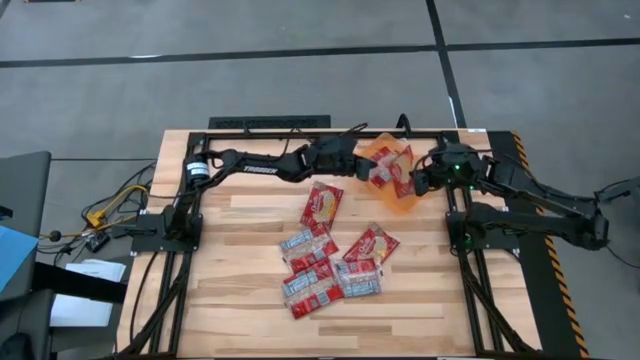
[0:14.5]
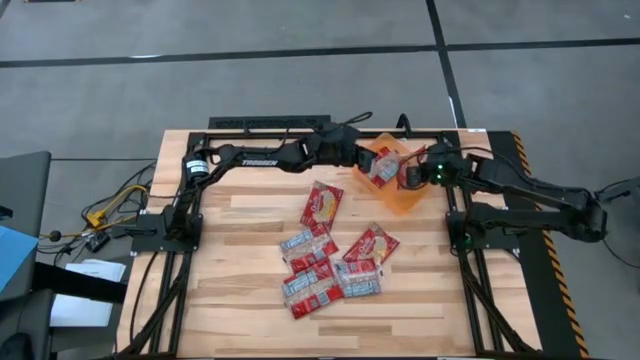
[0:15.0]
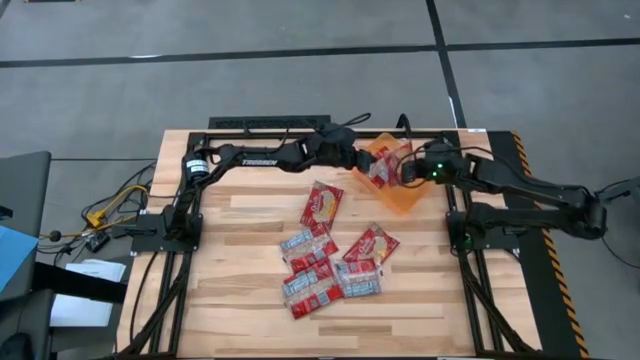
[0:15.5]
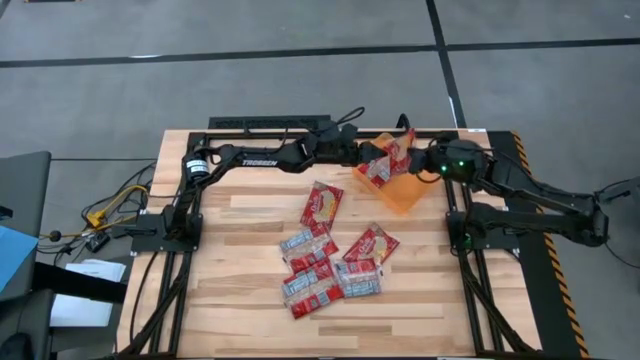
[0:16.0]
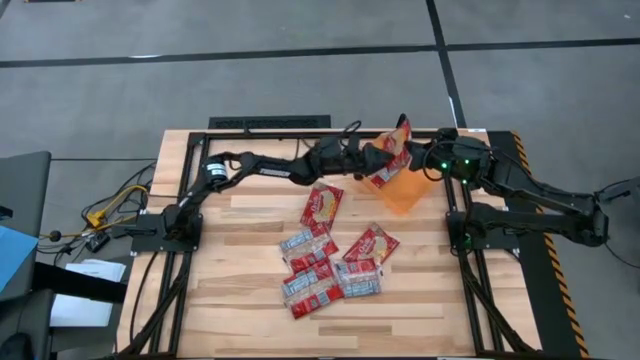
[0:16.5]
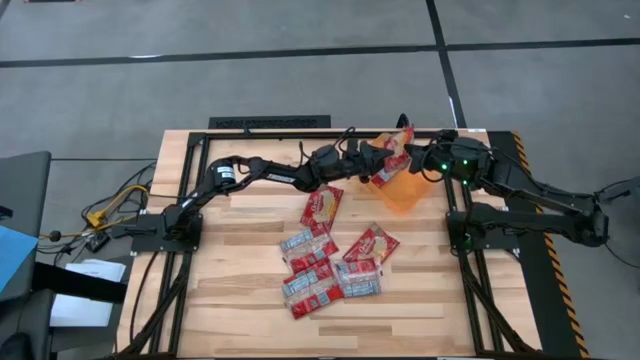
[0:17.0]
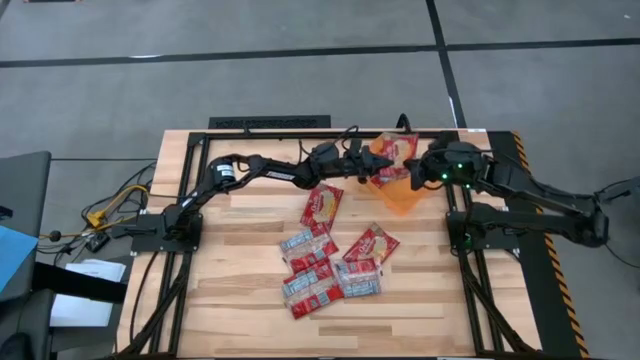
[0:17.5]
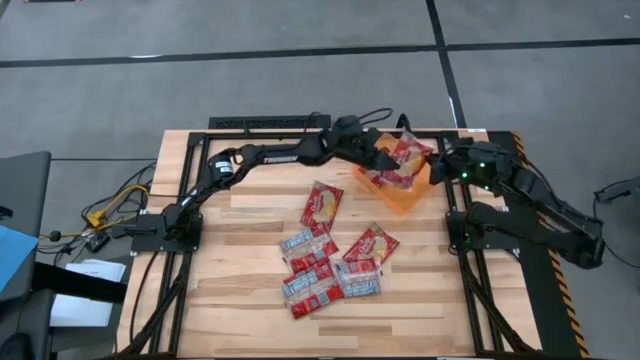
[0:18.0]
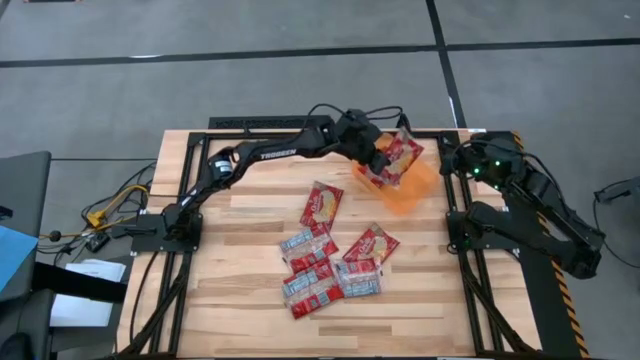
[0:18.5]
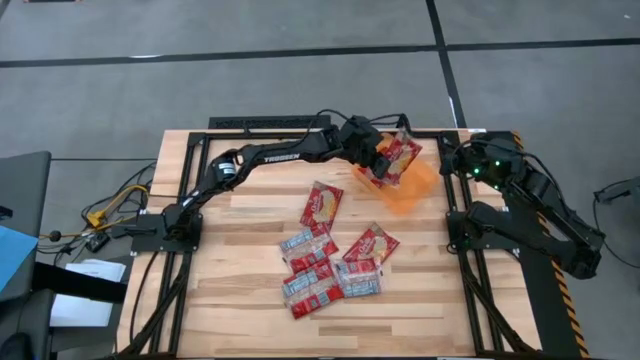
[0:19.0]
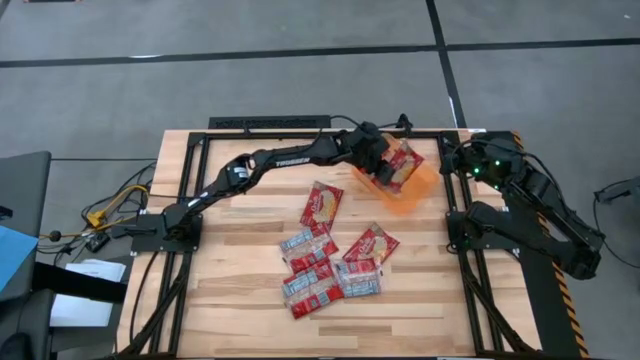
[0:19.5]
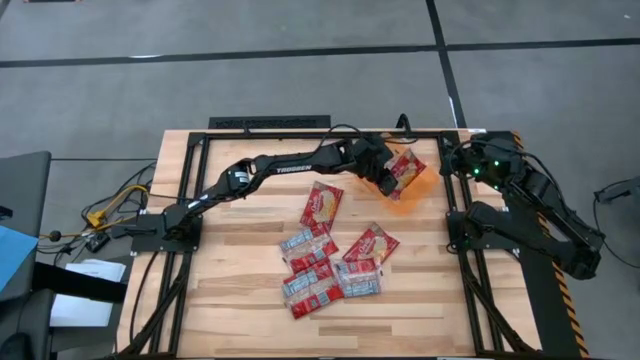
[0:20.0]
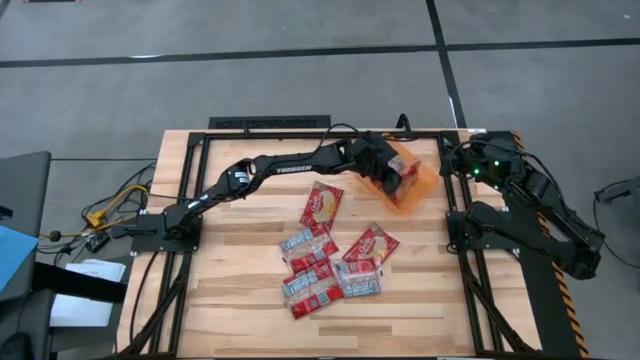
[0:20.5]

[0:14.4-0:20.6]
Task: Sort popcorn bags into baskets
Put the popcorn bag into the orange transparent bin

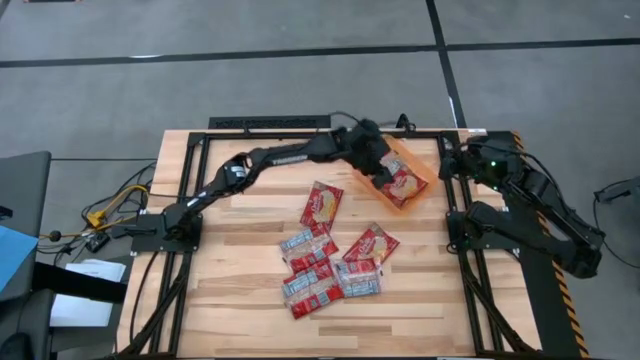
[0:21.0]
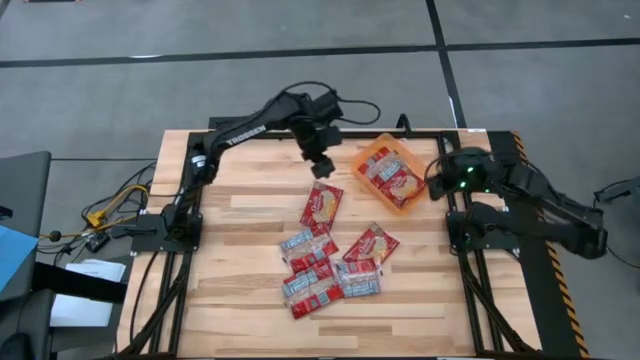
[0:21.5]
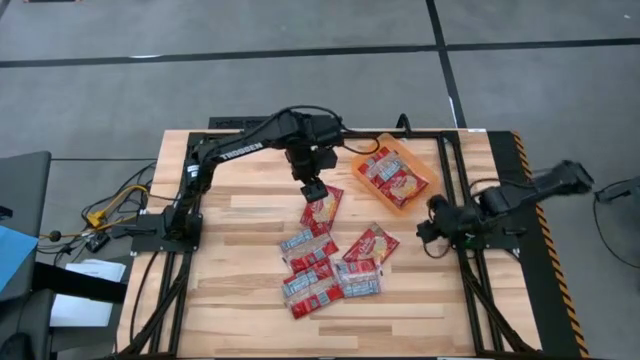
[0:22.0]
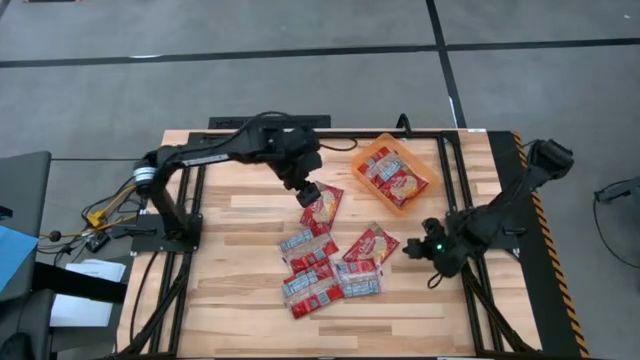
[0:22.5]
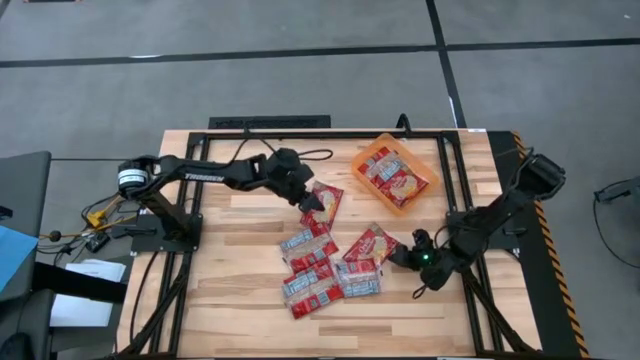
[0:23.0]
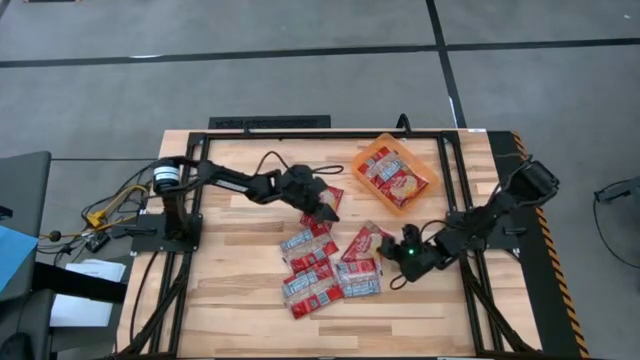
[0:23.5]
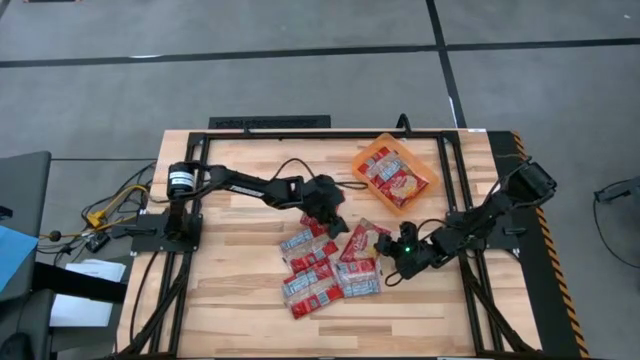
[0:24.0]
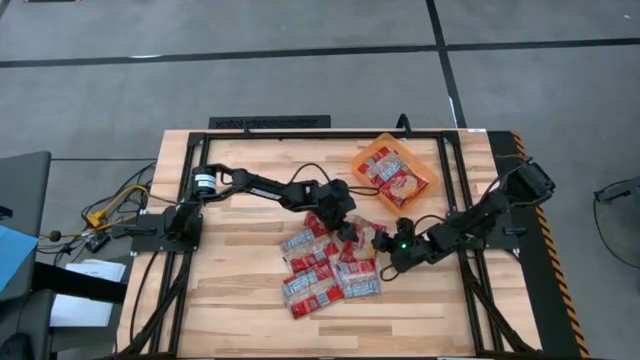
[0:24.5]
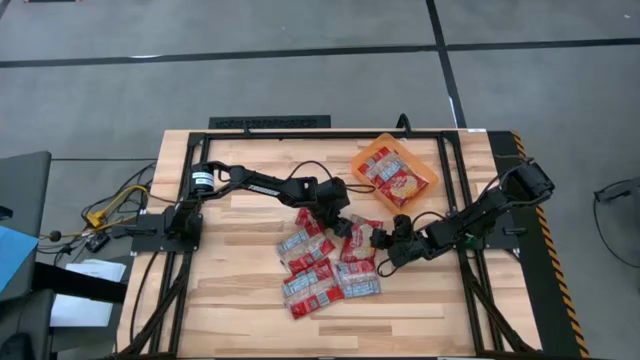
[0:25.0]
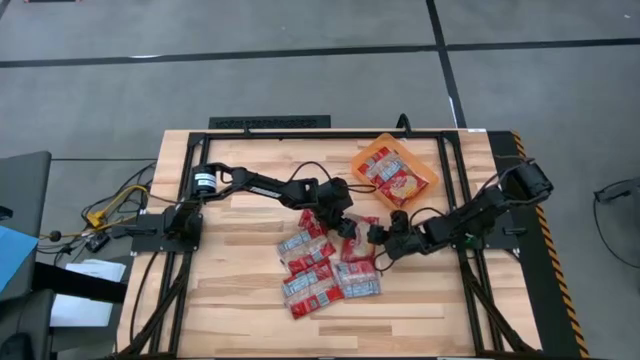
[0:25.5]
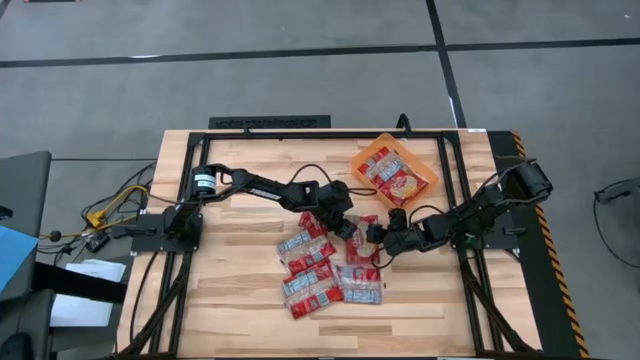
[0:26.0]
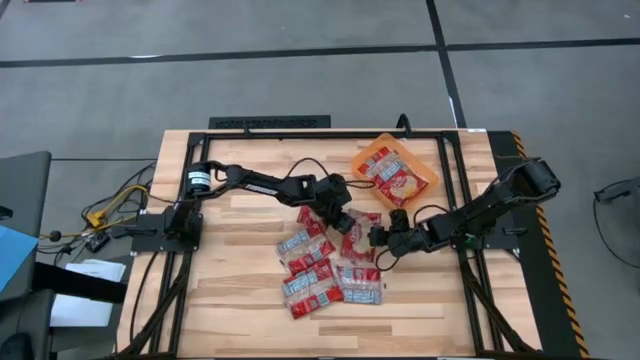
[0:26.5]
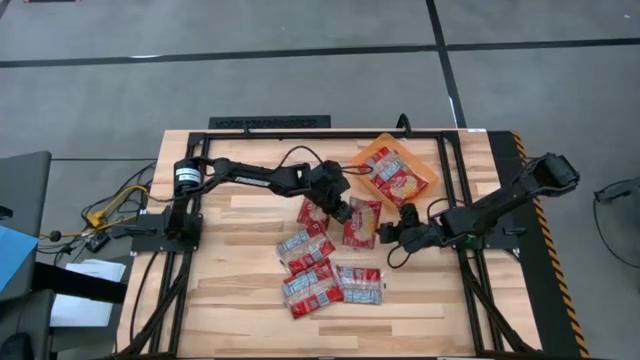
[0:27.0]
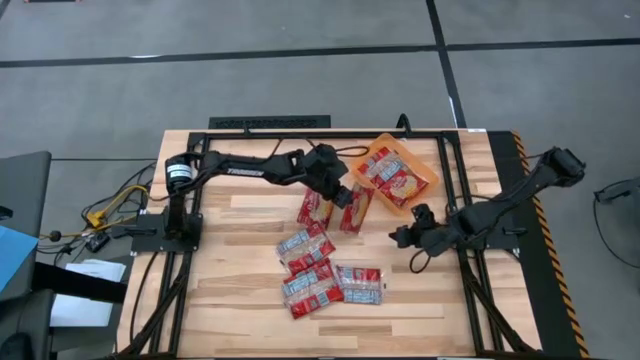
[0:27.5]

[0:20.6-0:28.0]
Put the popcorn bag into the orange transparent bin

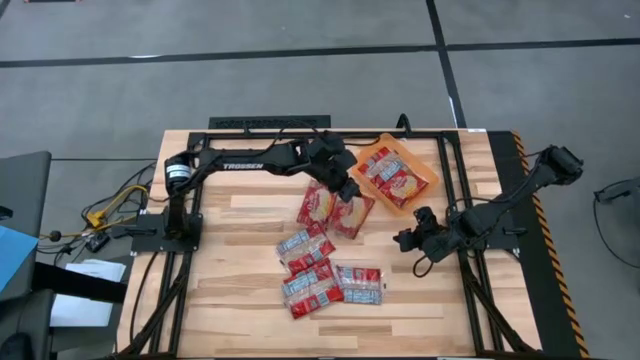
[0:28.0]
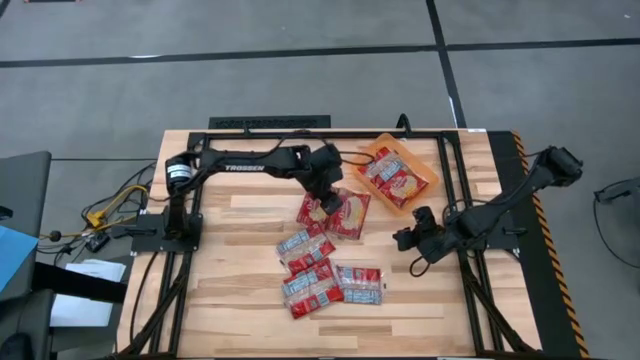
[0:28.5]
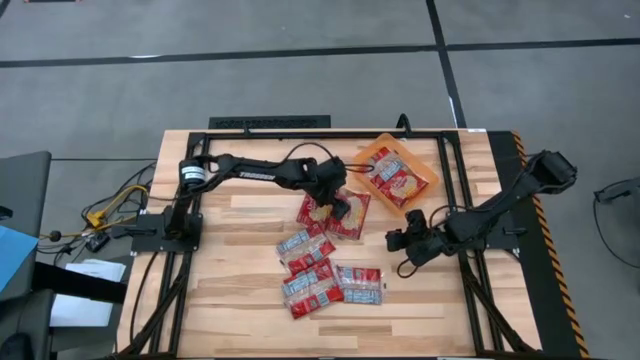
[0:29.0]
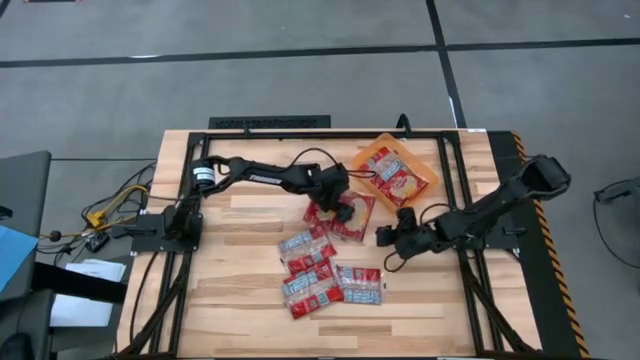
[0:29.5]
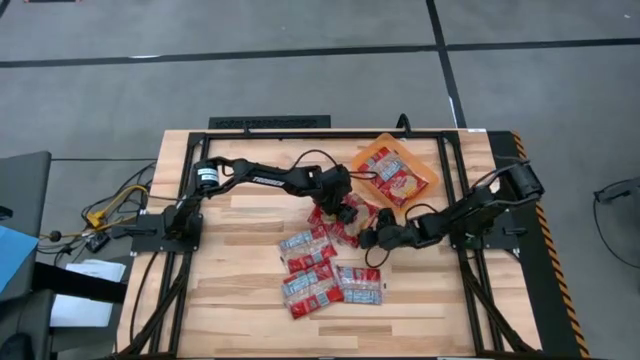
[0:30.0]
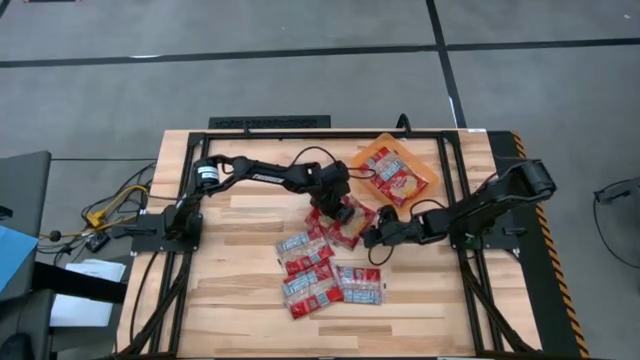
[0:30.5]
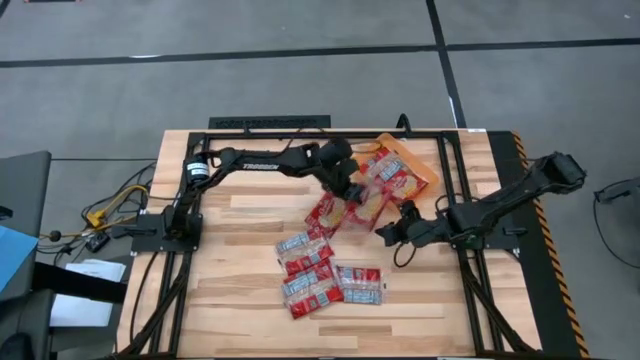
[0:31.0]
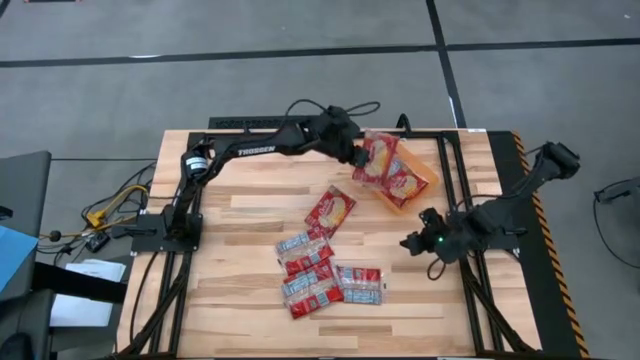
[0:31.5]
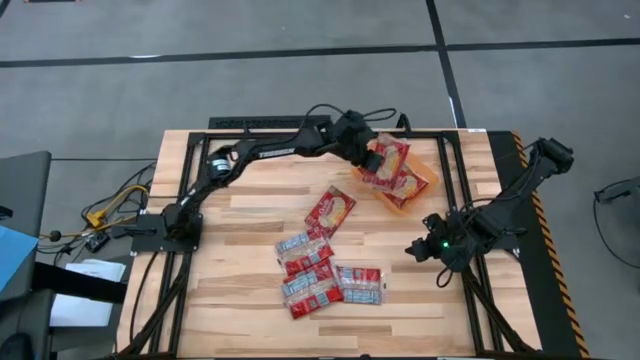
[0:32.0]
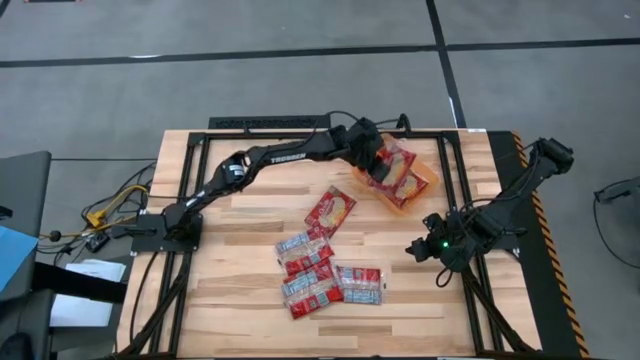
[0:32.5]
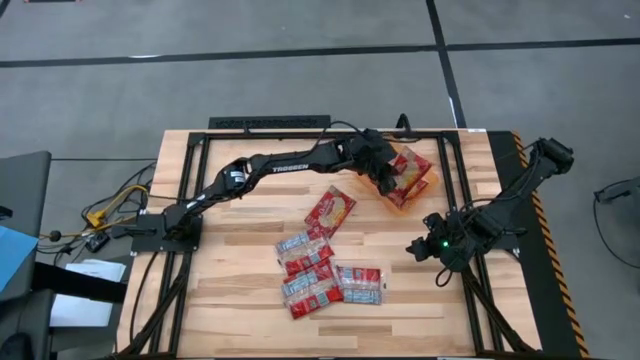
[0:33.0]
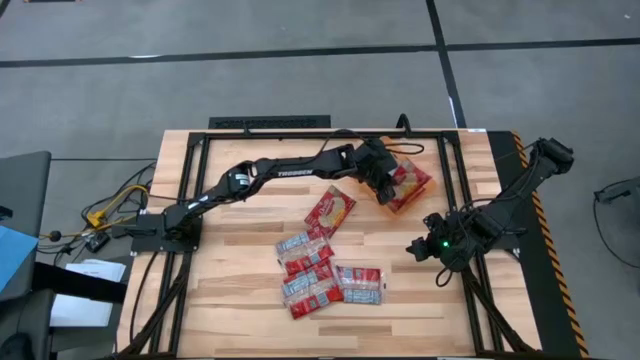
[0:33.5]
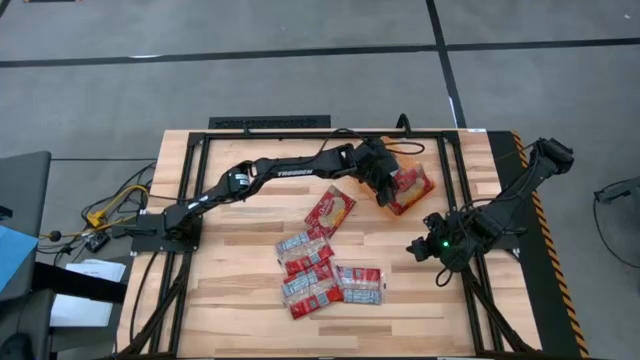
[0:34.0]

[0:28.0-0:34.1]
Put the popcorn bag into the orange transparent bin

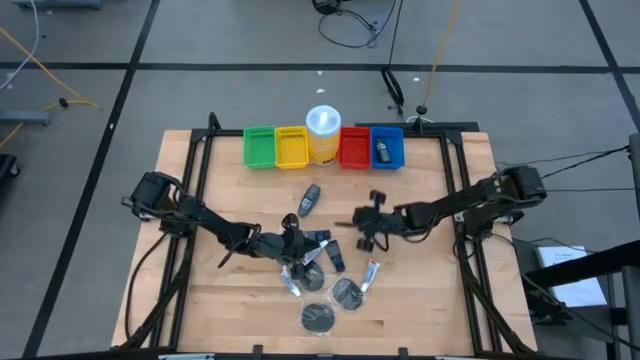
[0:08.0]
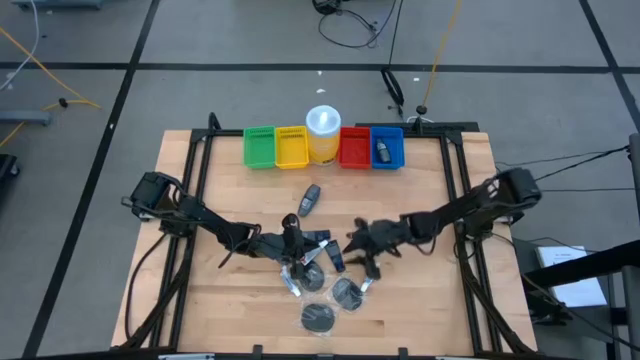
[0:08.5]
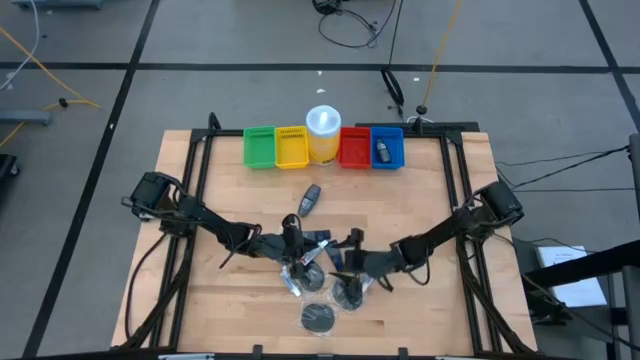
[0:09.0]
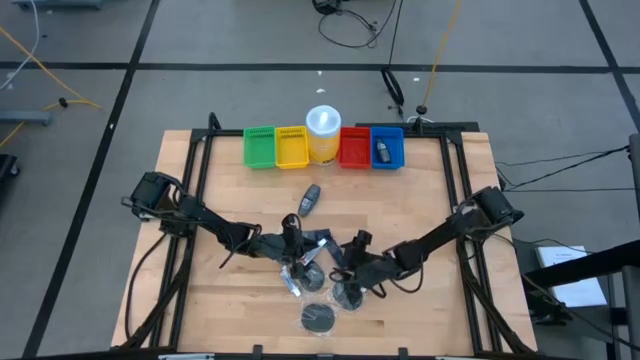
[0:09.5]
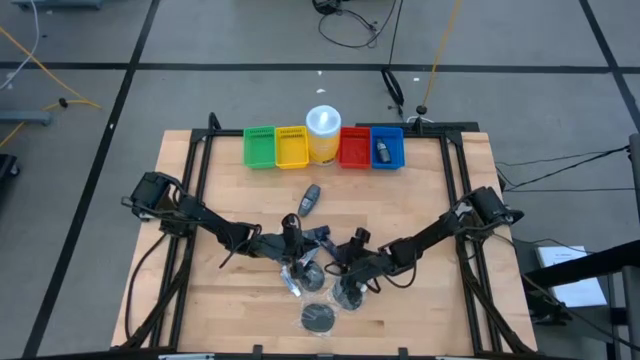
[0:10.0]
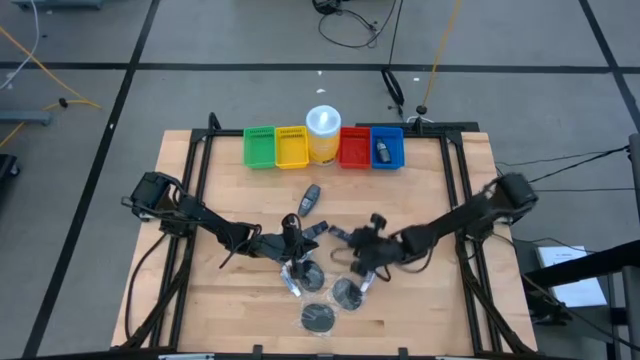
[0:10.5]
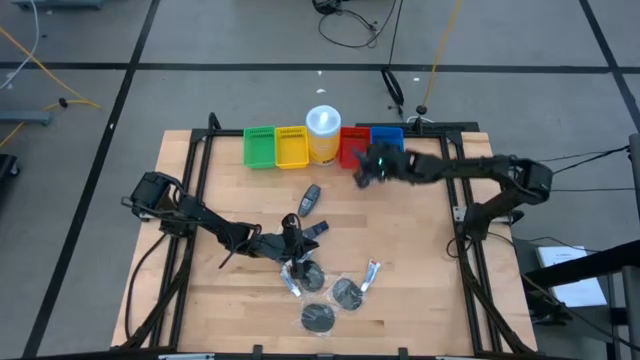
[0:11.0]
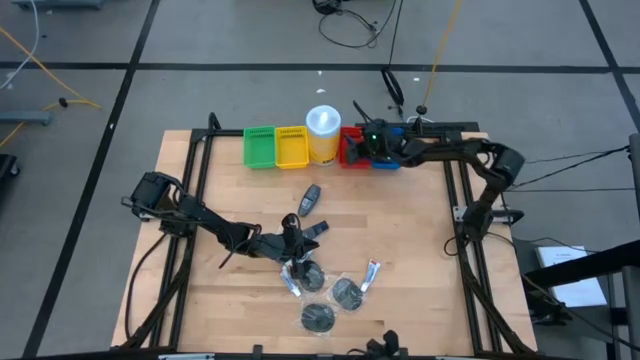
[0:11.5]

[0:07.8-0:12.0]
Task: Pick & Place Travel size toiletries
Put the dark blue shave cream into the red basket
